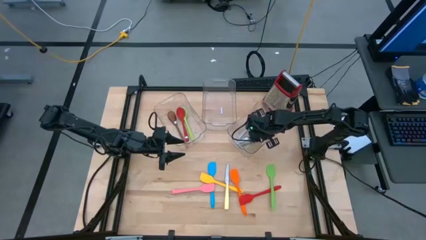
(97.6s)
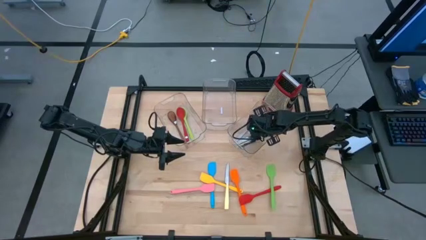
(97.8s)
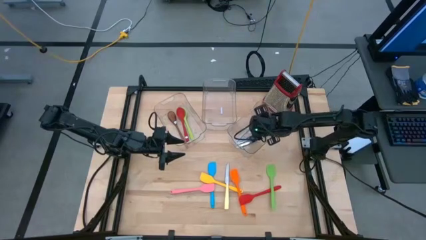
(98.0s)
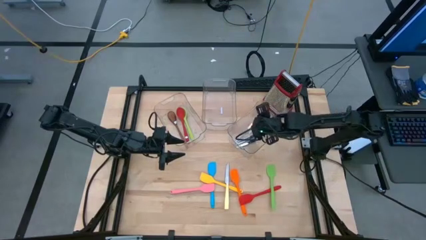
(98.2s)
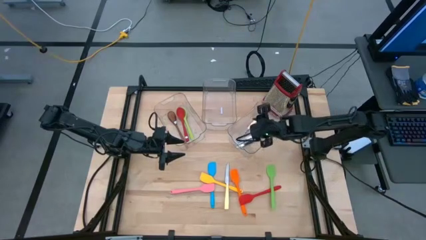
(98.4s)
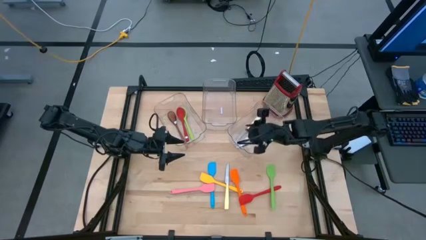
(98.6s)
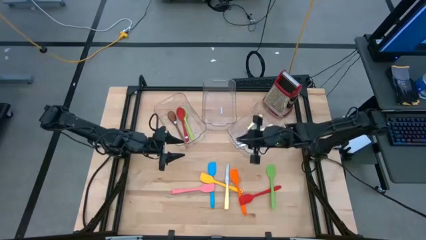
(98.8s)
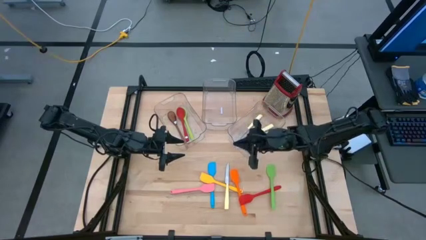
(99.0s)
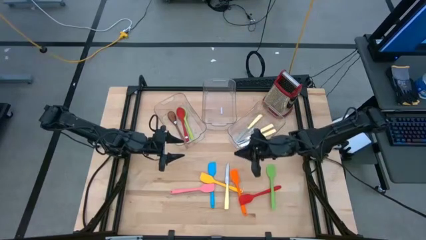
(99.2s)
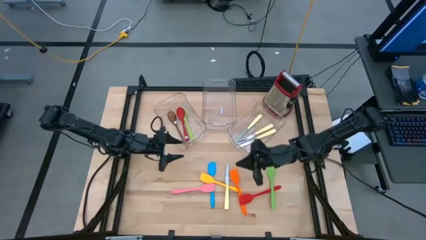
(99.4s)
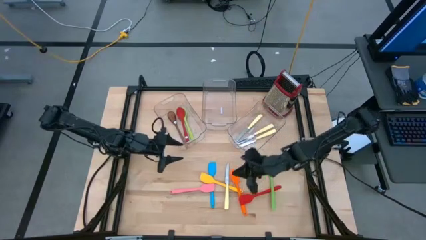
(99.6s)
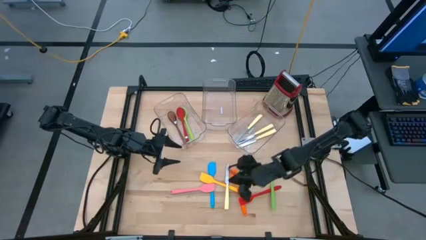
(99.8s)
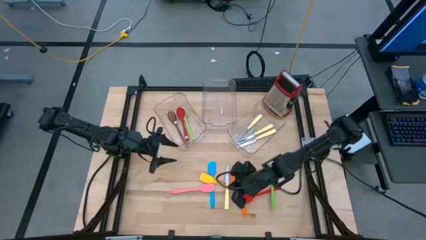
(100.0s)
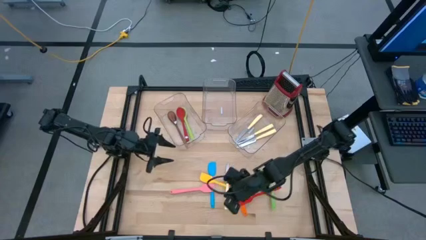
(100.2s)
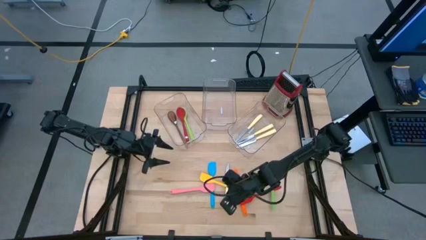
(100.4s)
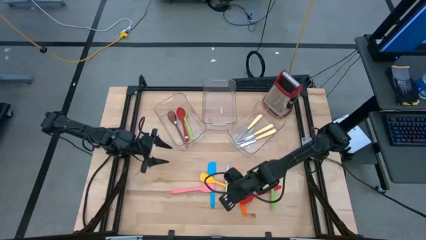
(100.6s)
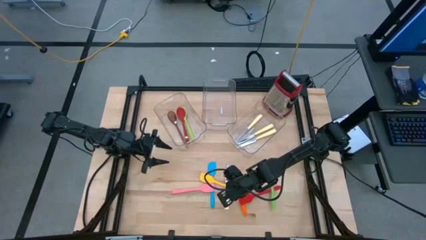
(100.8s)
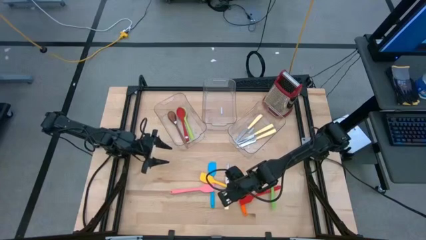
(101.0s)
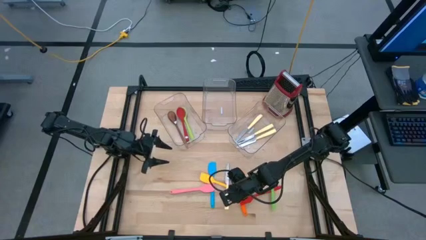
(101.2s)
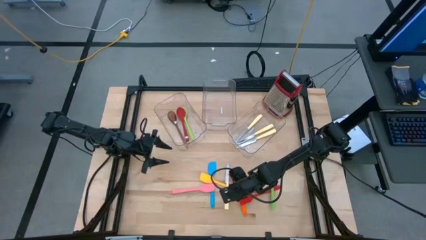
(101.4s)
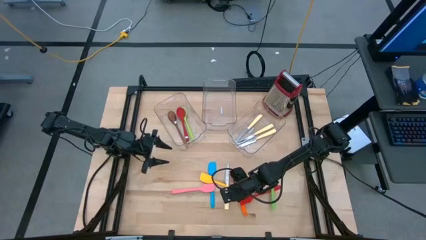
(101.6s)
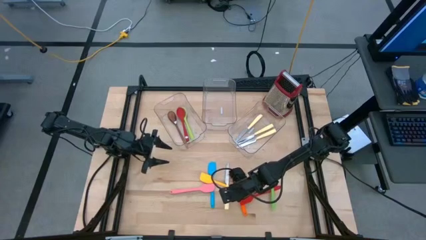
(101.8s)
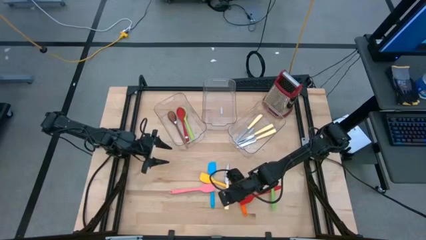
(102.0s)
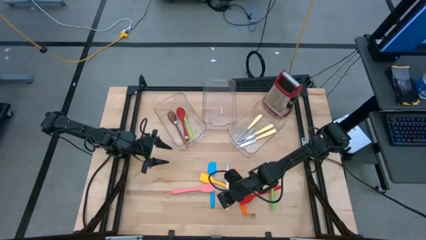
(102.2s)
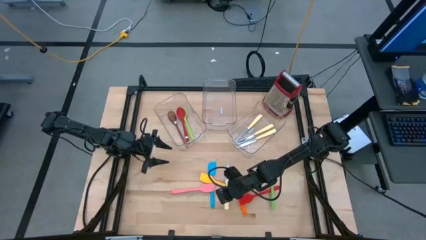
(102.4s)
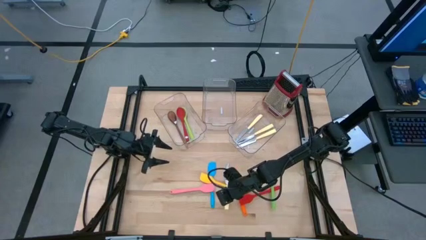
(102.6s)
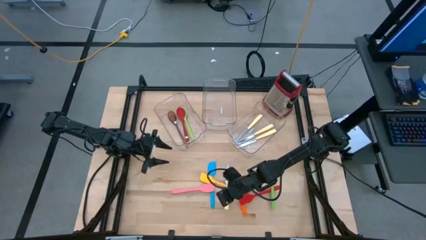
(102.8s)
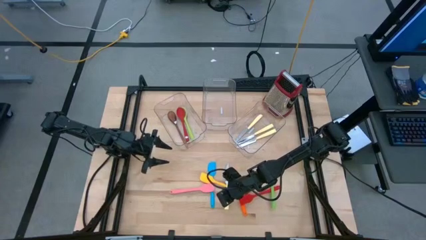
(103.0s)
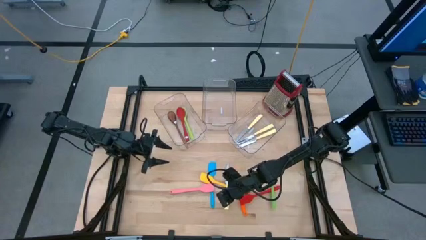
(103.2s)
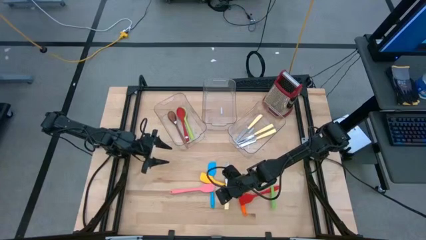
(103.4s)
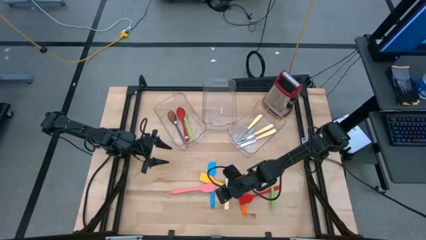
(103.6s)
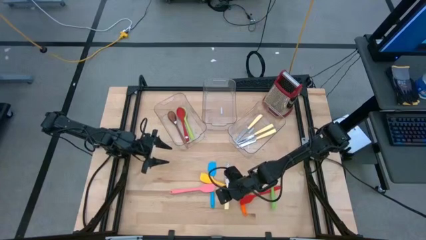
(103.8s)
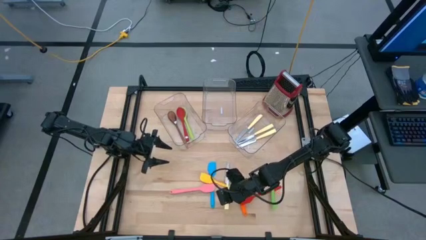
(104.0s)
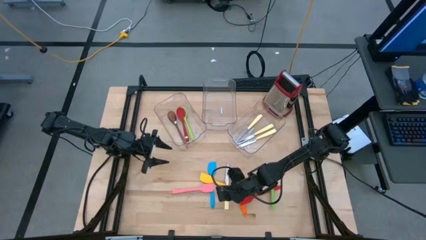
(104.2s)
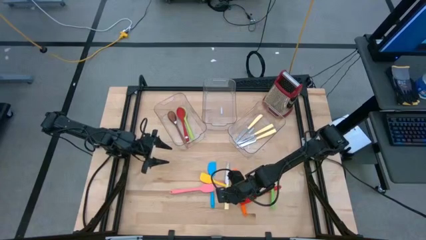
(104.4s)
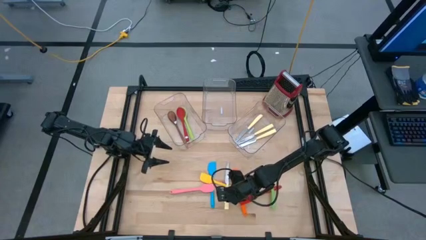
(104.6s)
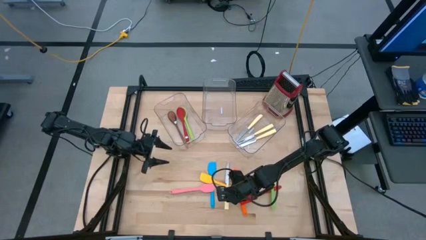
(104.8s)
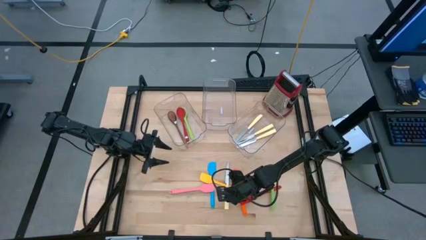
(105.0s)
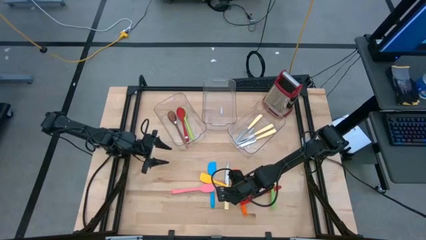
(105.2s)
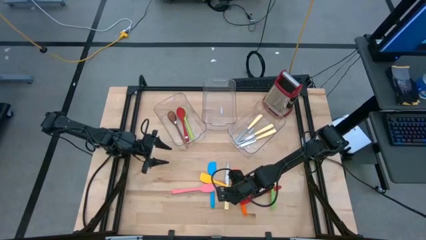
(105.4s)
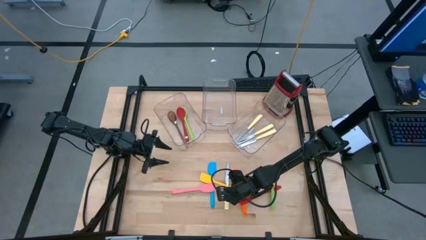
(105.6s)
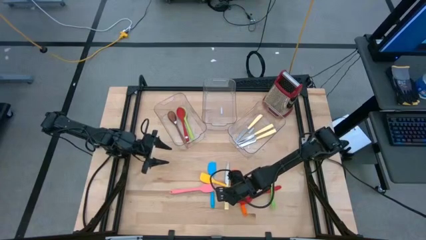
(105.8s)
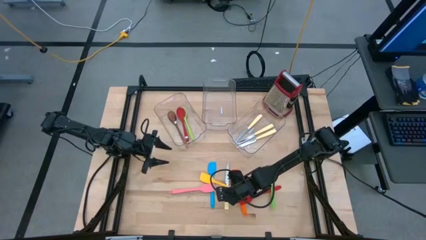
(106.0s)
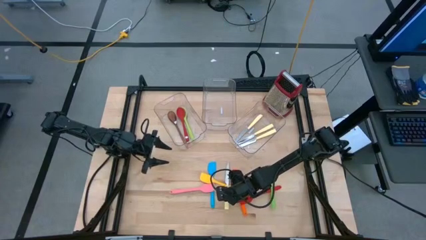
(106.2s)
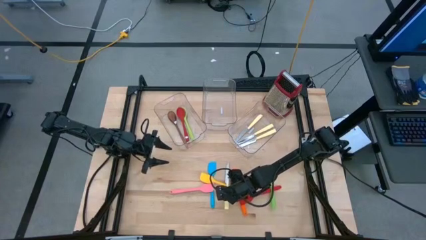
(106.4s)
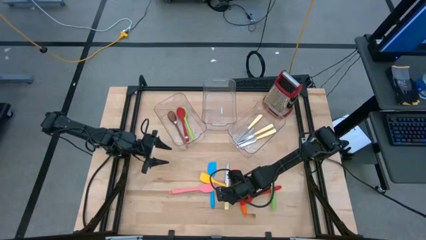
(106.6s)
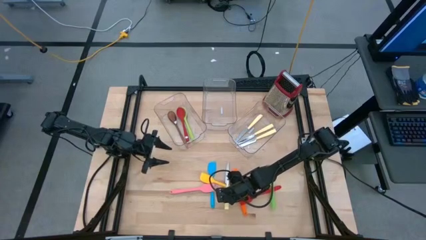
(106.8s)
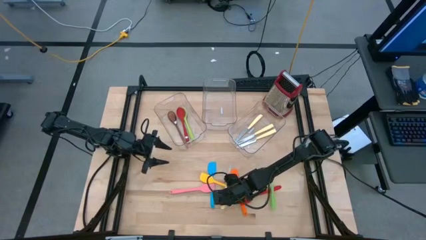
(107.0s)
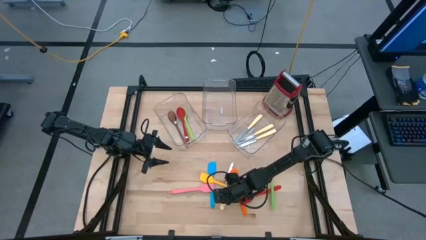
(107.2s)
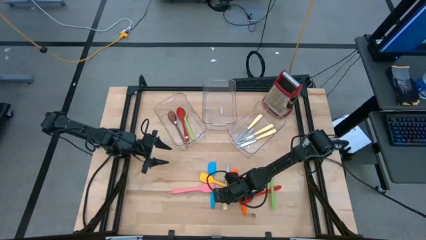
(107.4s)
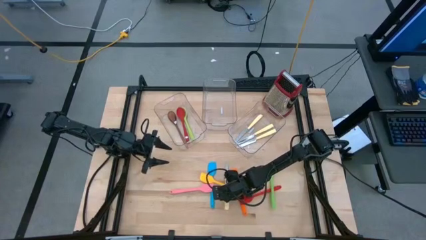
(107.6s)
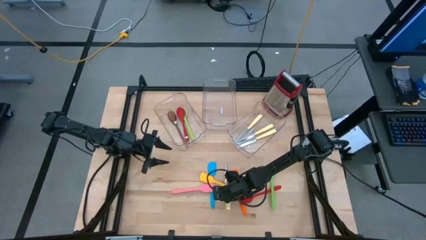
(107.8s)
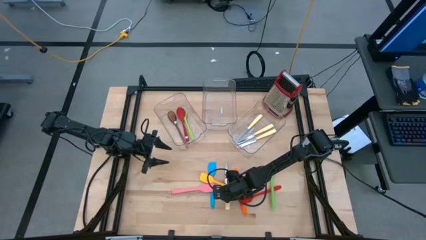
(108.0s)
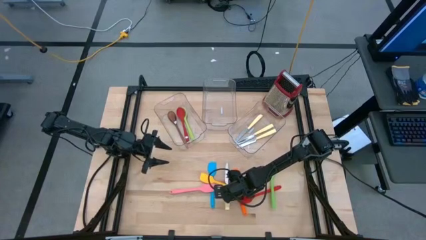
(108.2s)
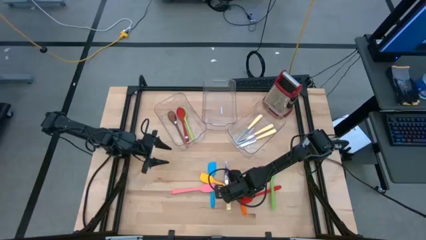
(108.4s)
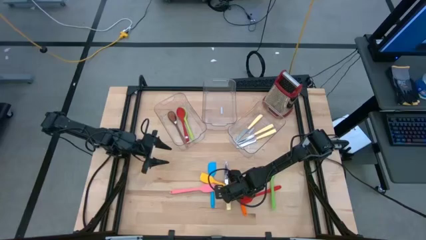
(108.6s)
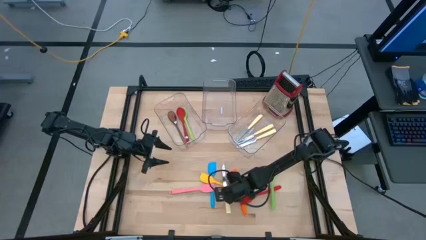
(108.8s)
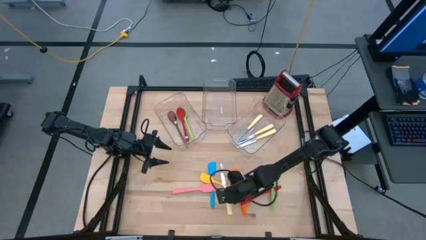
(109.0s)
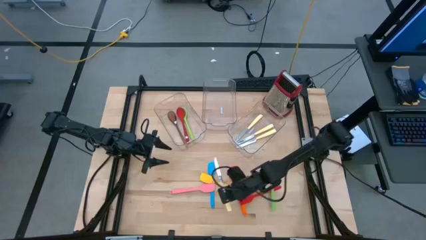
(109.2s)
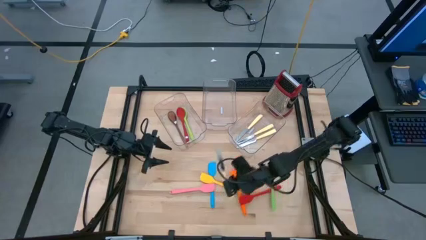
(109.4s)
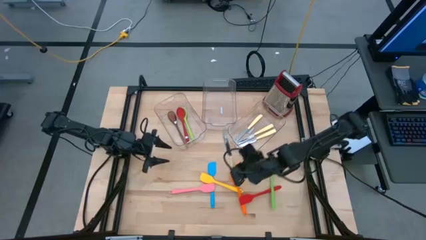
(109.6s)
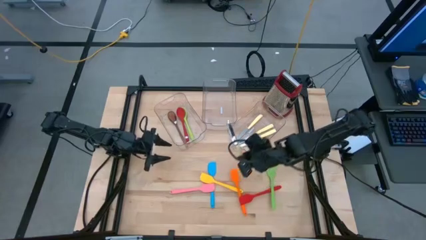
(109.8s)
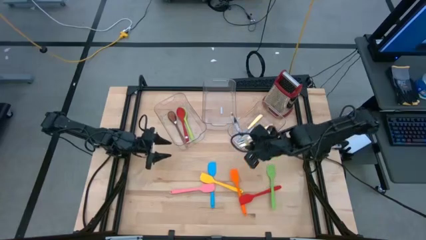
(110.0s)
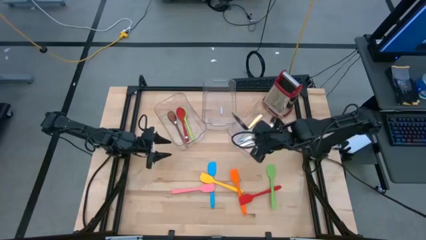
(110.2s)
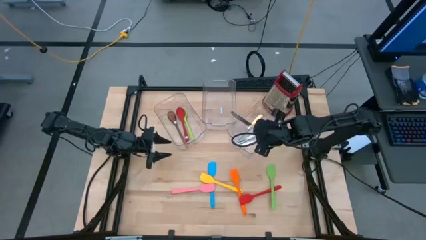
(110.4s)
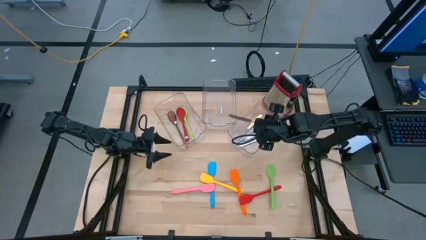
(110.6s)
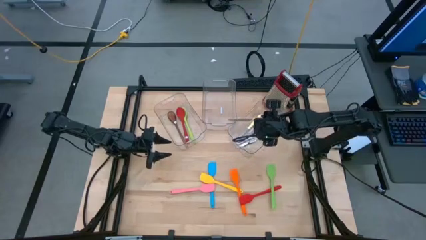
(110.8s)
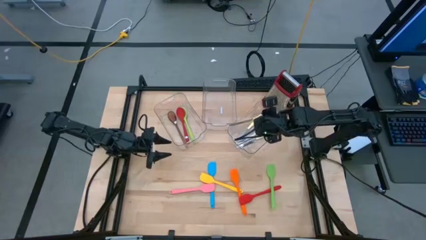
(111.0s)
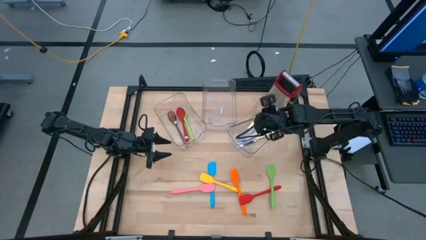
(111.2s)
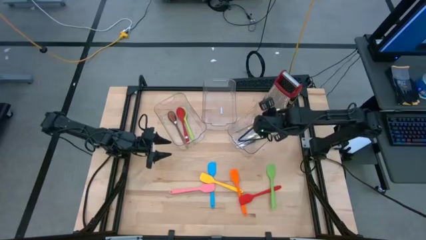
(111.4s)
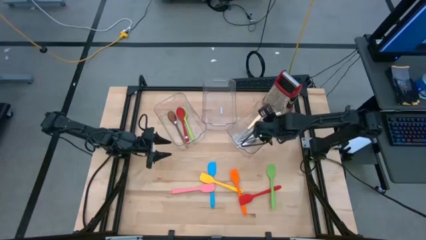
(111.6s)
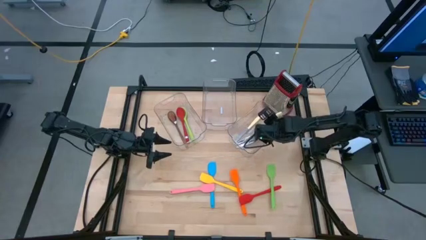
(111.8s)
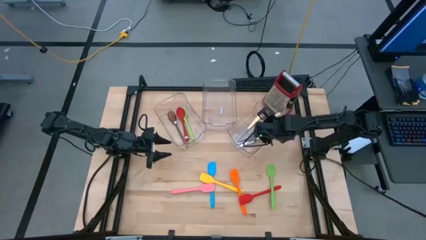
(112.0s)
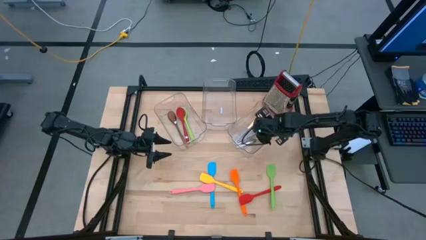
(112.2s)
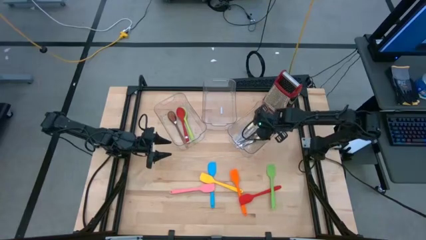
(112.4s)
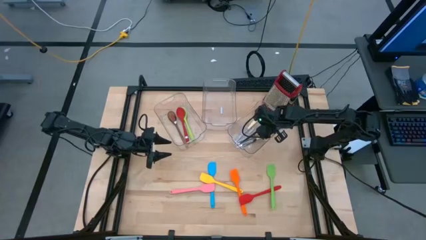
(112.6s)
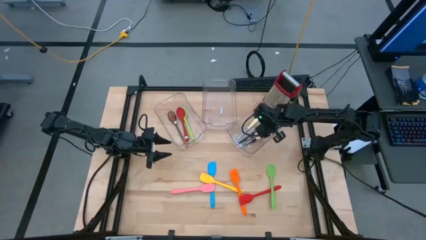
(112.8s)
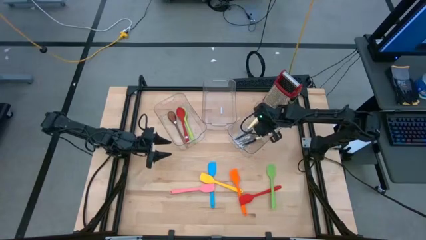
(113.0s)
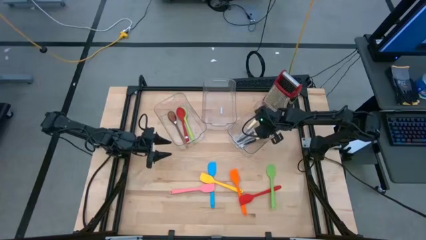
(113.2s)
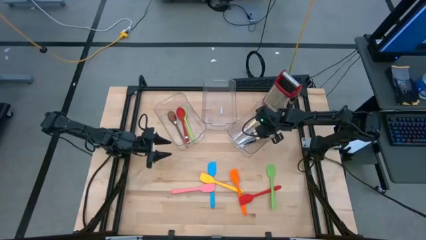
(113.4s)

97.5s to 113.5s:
Task: Pick & Place Kitchen Items
Put the yellow table knife into the right transparent bin
